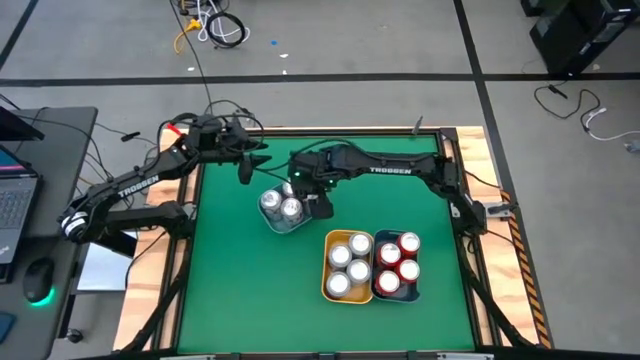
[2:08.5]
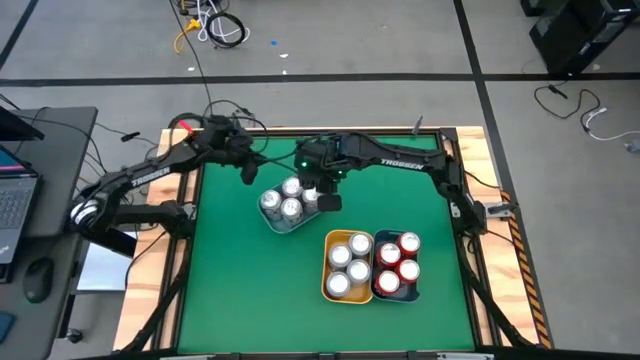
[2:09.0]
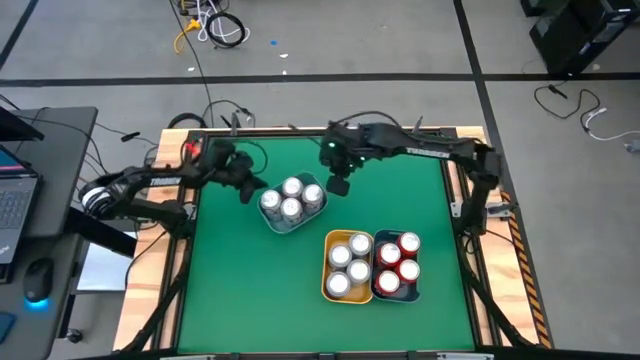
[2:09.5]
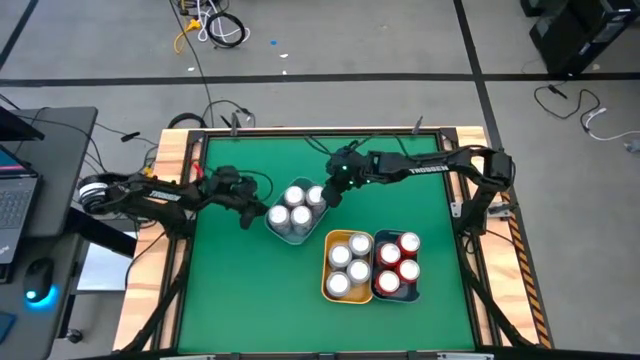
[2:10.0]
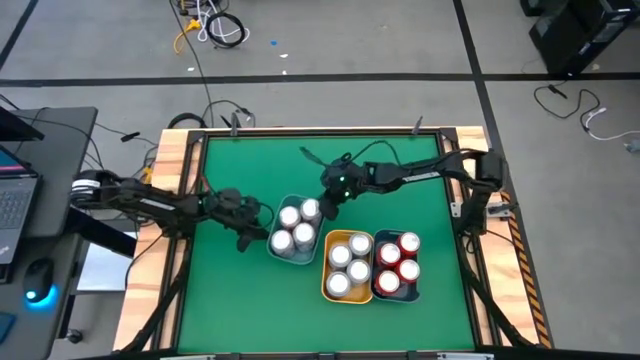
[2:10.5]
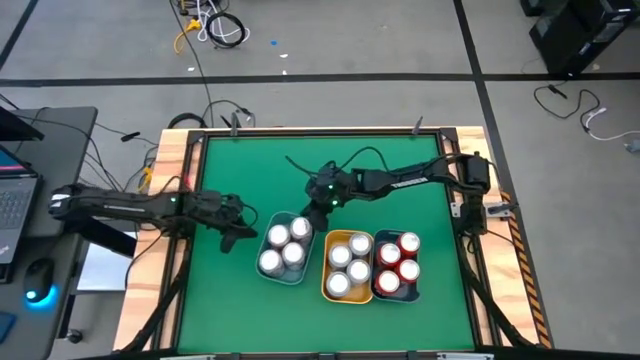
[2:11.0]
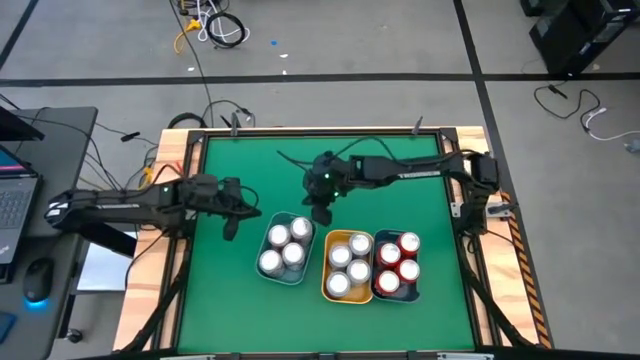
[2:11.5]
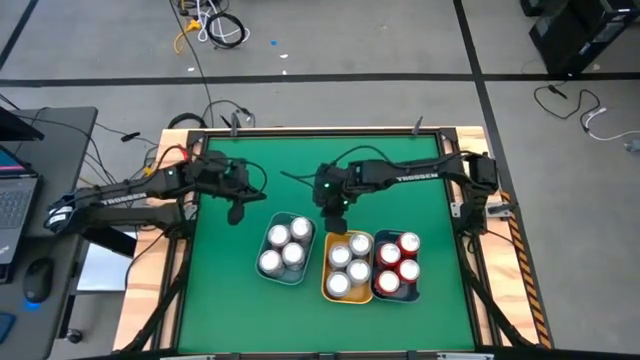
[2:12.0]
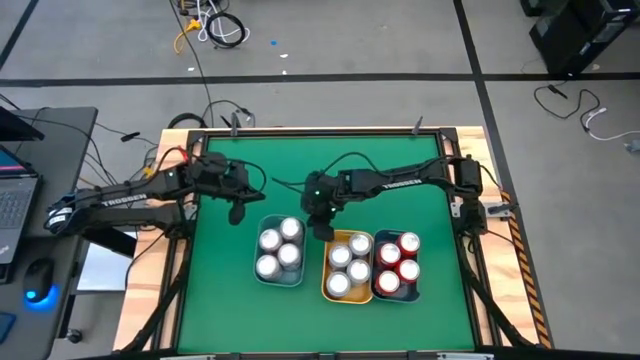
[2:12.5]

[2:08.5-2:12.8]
Task: Sort soda cans
Adjust the green bin on the table

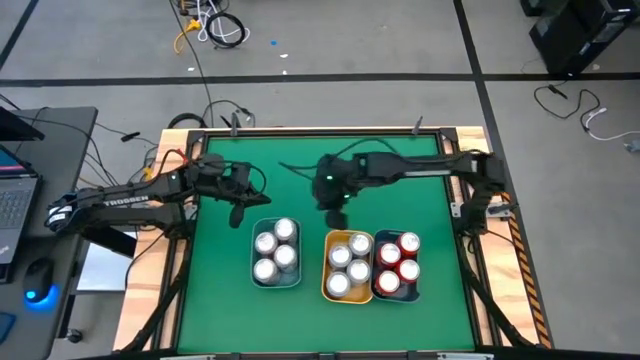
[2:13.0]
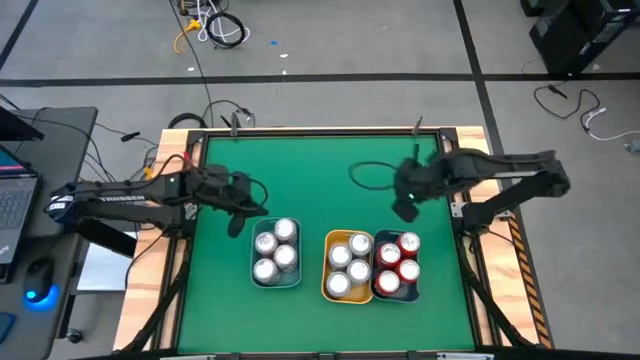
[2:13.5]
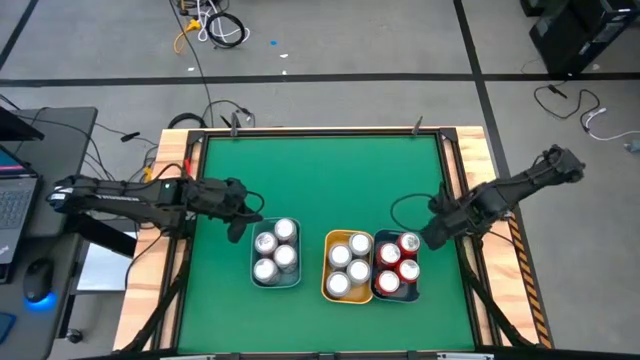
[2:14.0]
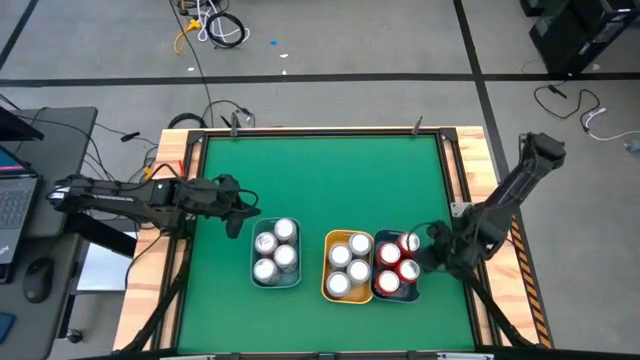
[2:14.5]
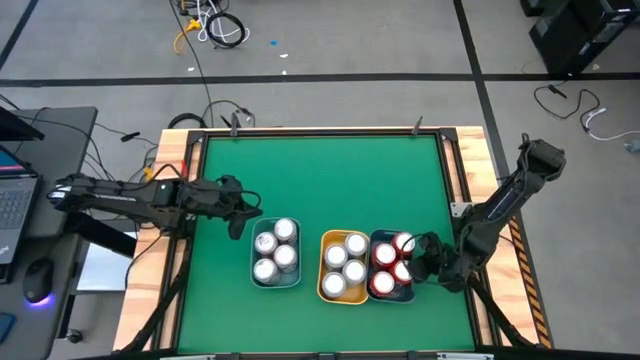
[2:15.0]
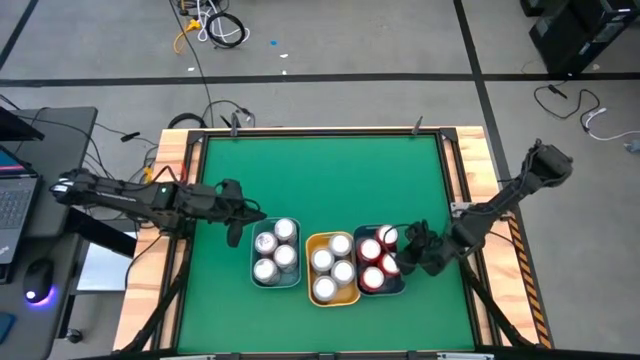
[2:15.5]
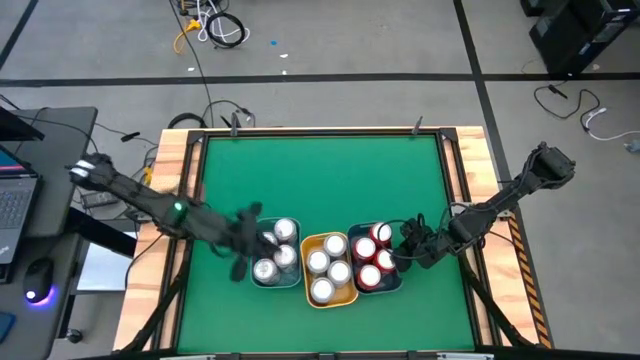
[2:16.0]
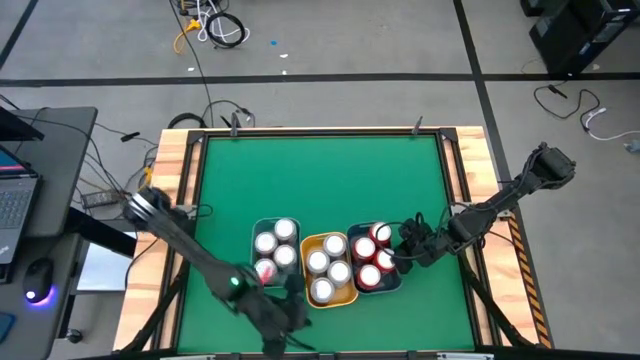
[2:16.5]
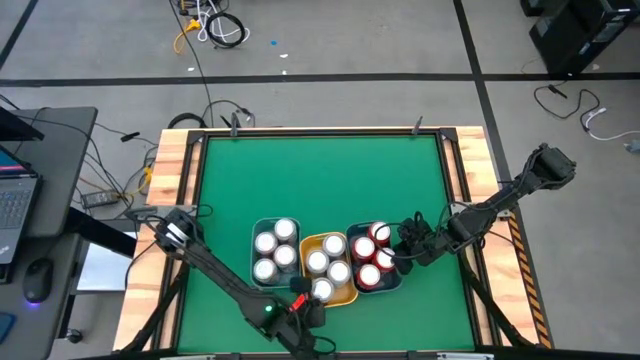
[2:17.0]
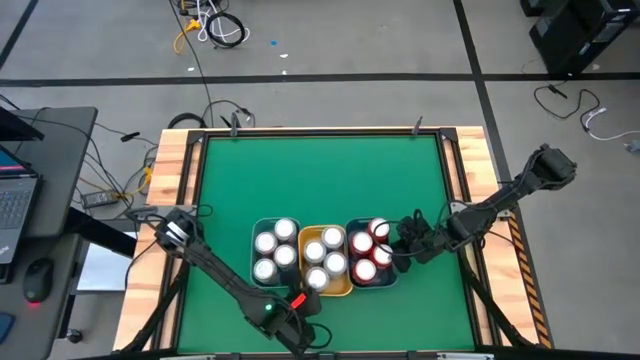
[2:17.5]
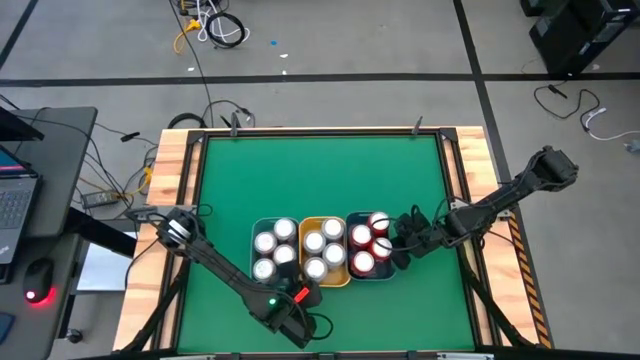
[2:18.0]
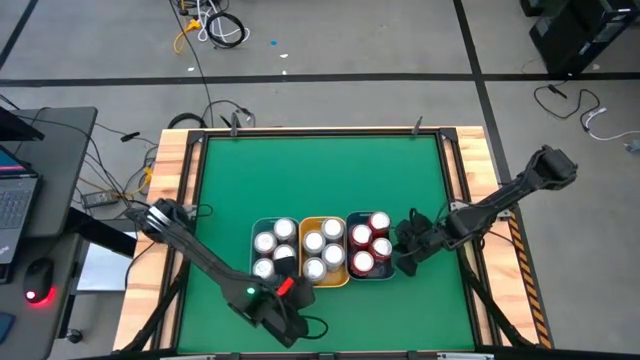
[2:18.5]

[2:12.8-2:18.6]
Adjust the bins on the table

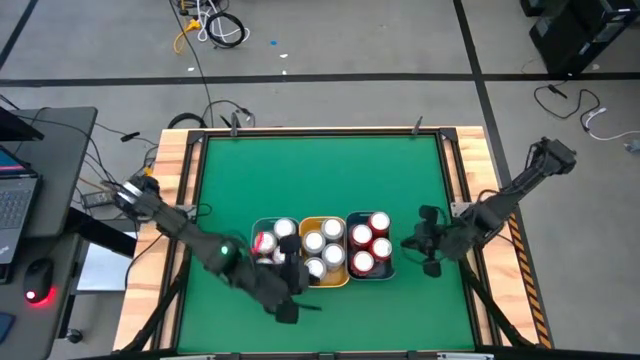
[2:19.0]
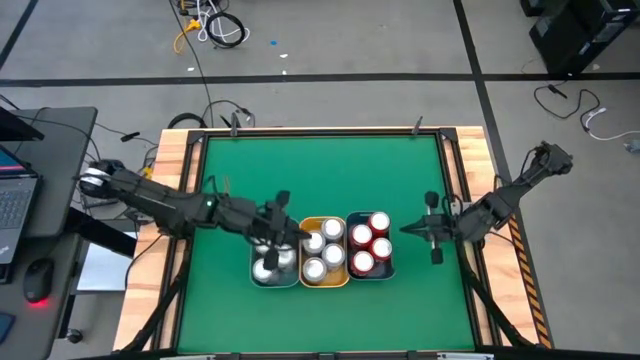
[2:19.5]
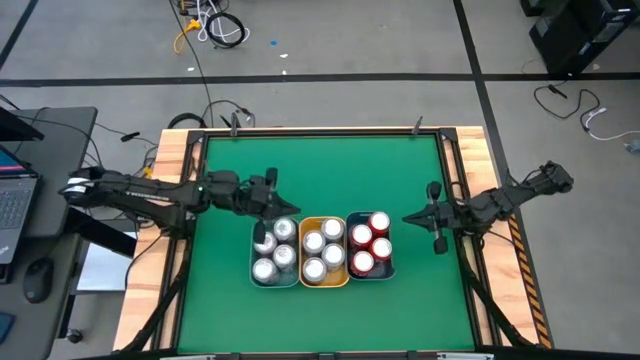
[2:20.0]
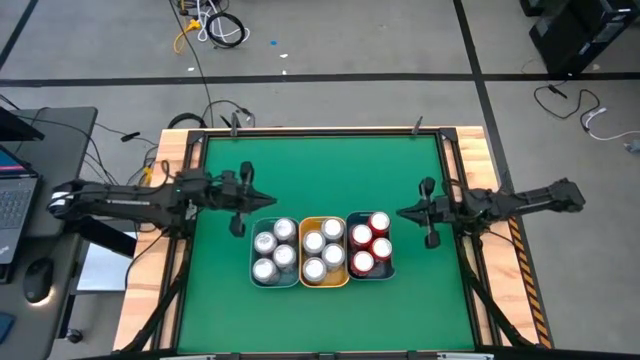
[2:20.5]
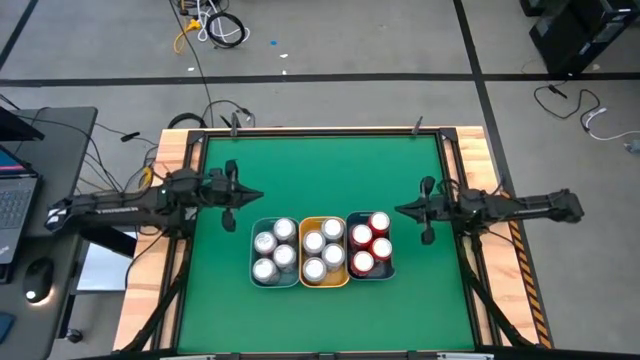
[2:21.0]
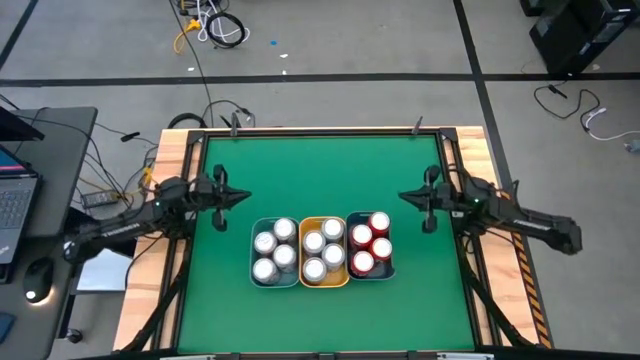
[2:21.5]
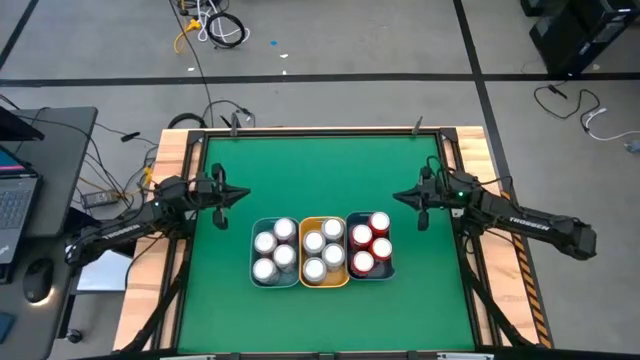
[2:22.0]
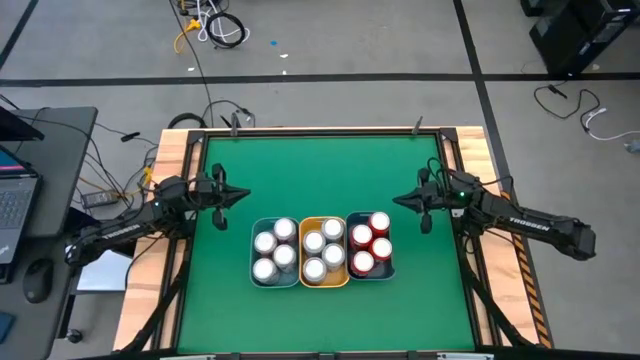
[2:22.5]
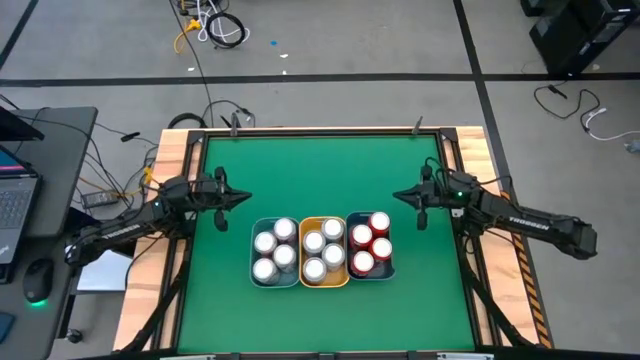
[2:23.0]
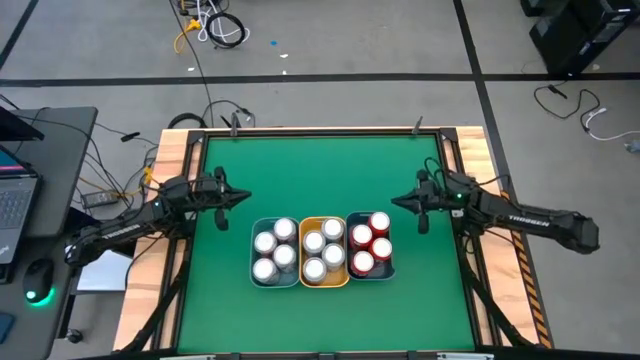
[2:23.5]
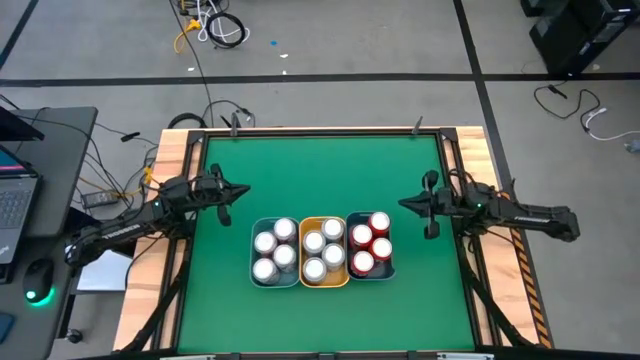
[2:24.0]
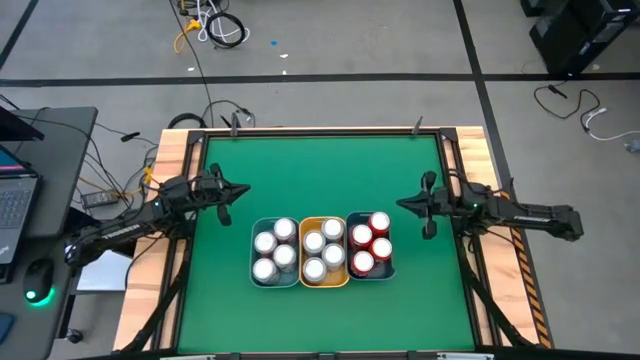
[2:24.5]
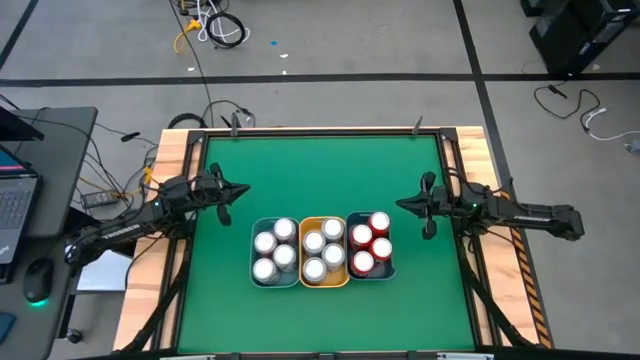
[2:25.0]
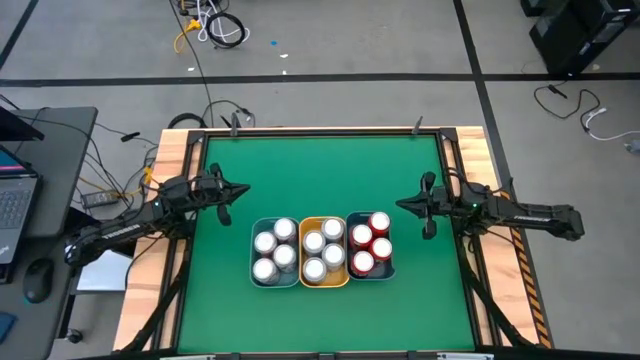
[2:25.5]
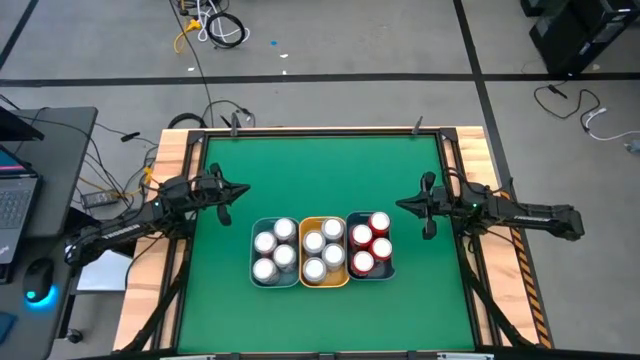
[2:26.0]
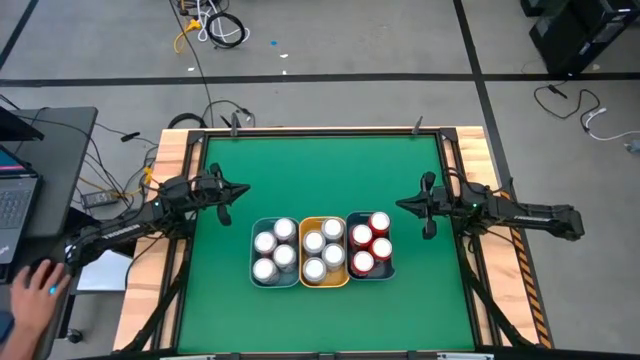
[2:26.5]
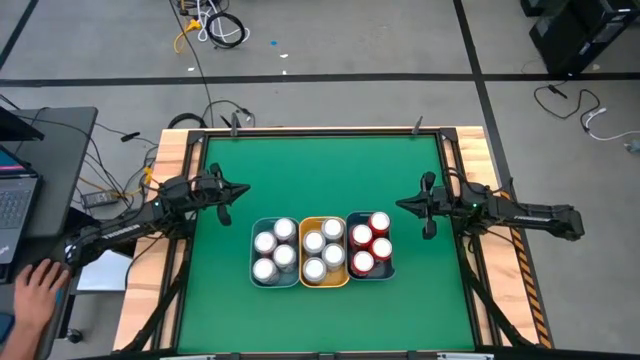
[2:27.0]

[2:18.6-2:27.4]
Return to Home Position

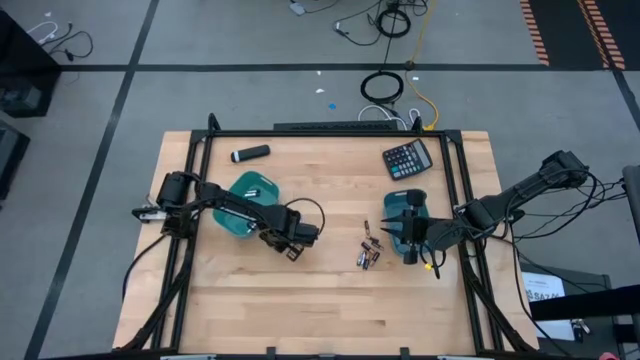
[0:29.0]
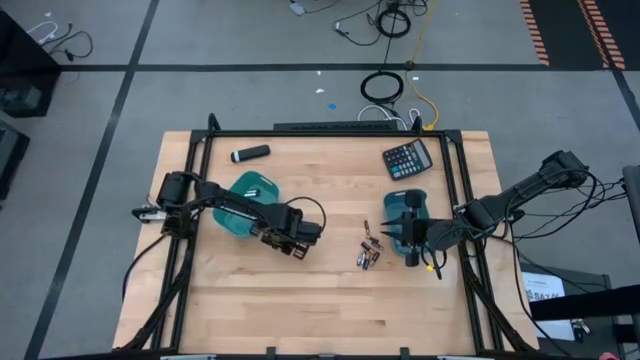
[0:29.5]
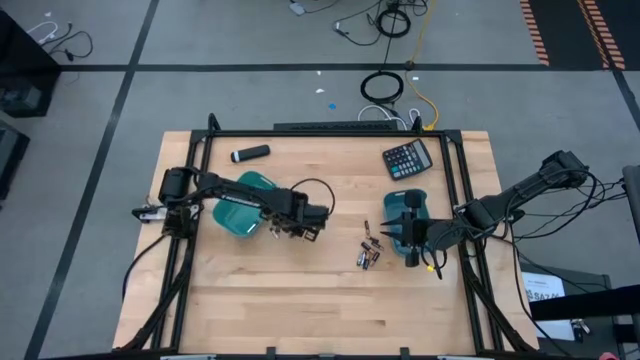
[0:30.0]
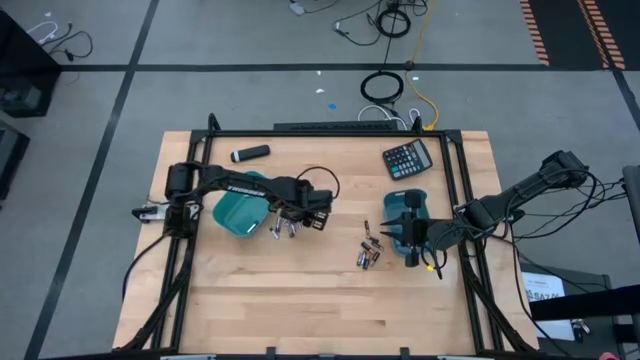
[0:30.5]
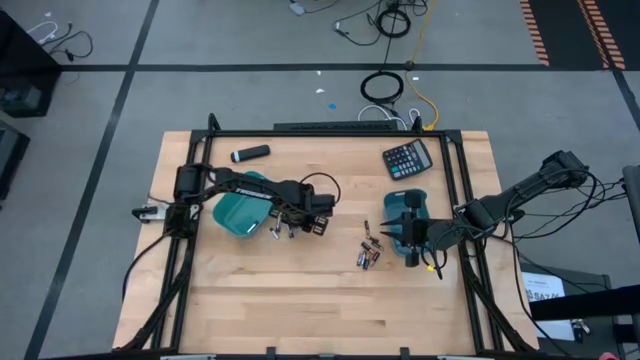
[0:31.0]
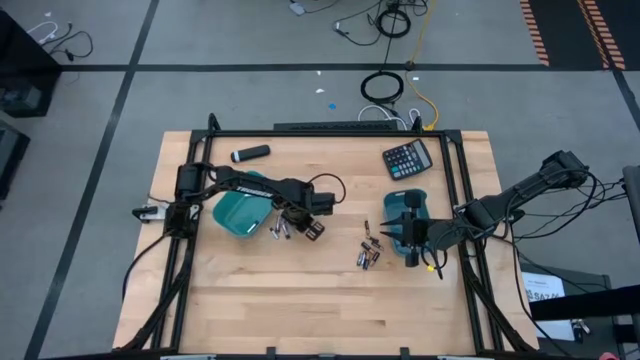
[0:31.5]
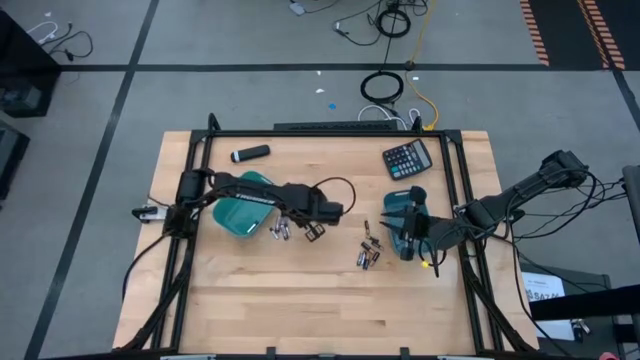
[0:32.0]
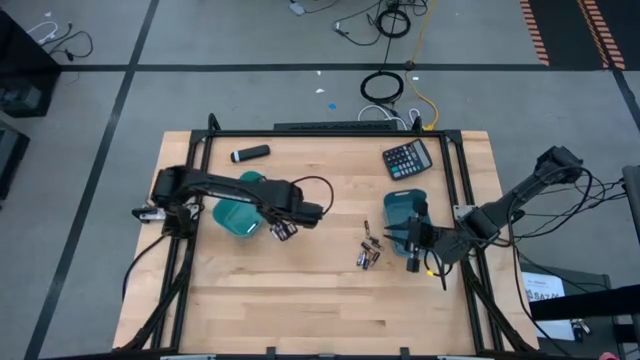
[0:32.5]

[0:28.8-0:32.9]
Task: Sort batteries
Put the silver battery into the green bin
